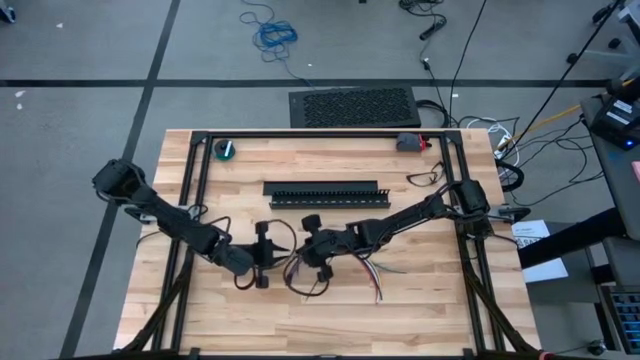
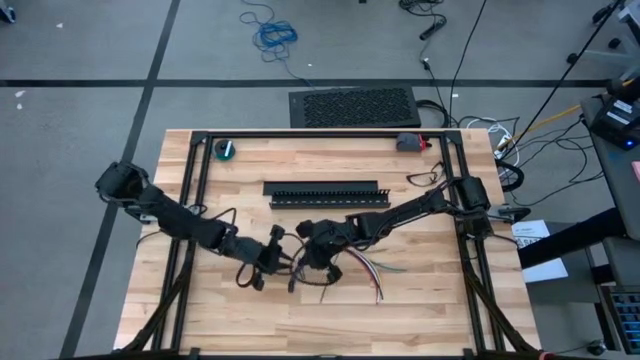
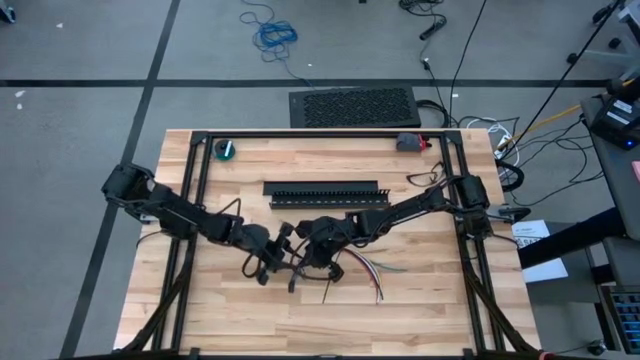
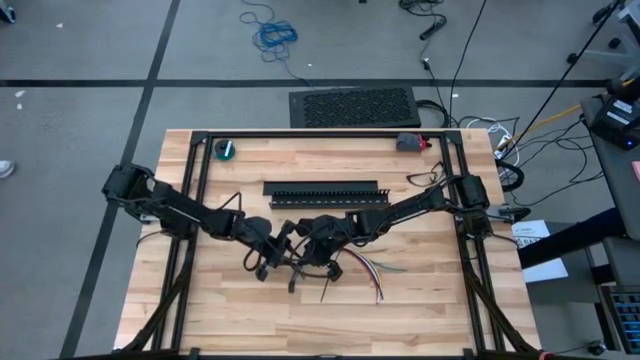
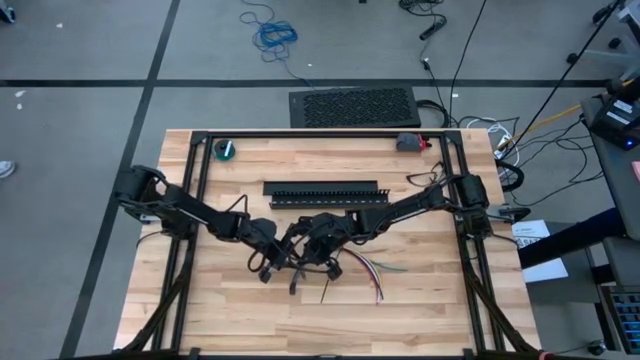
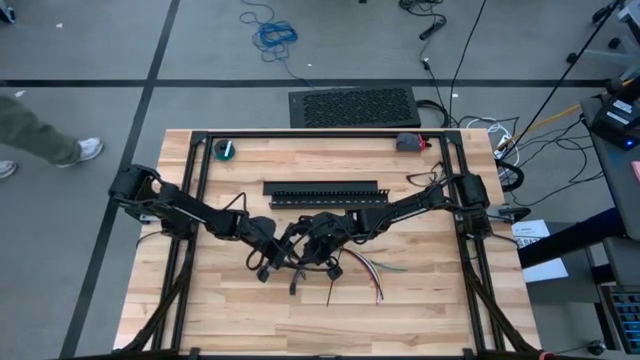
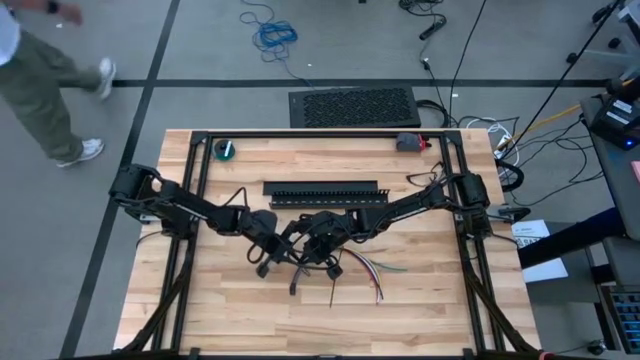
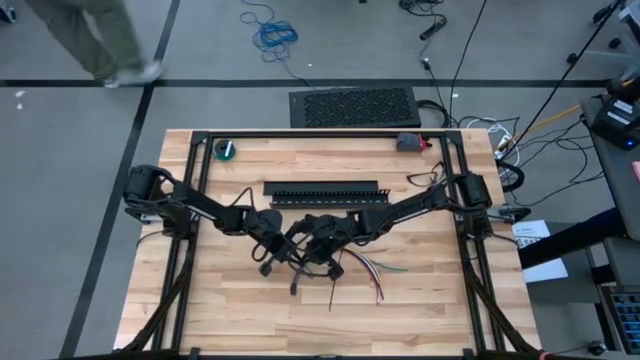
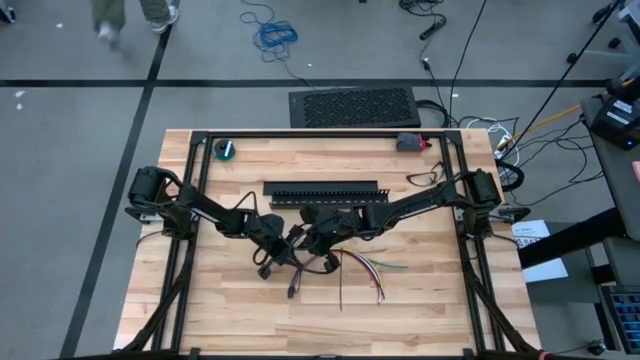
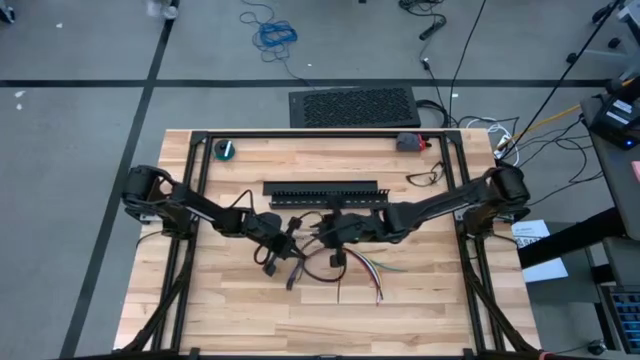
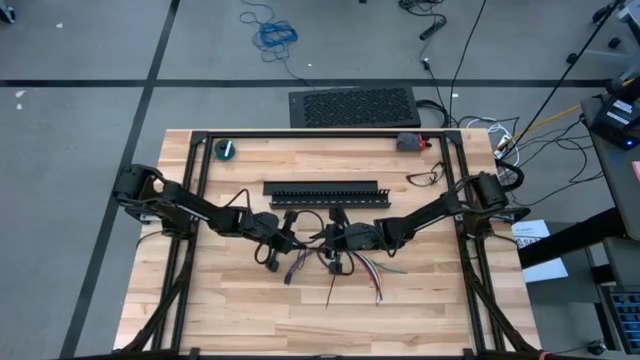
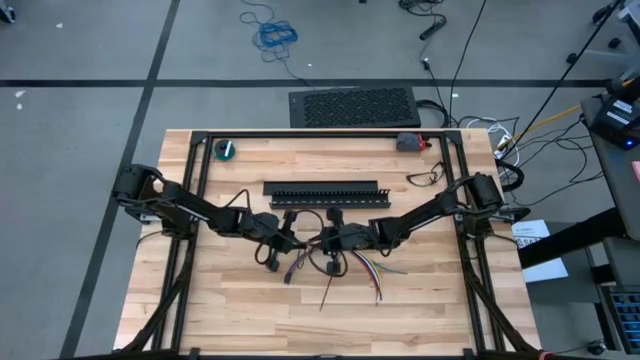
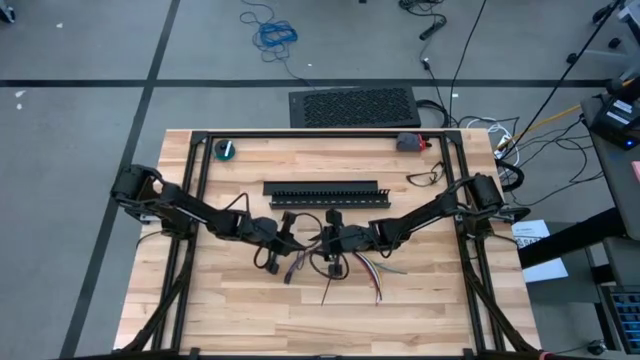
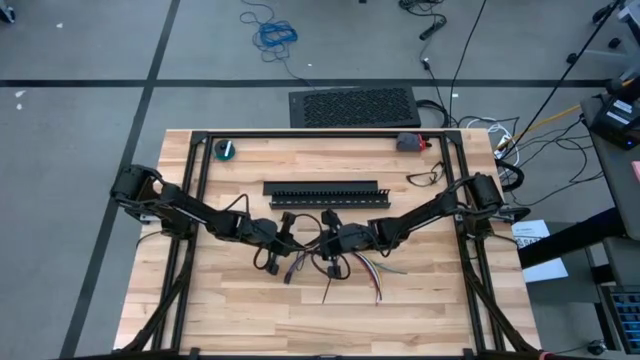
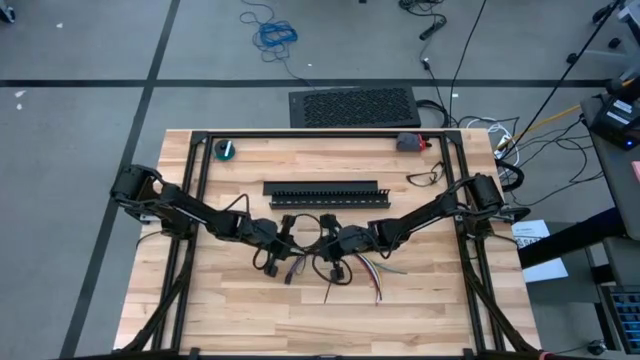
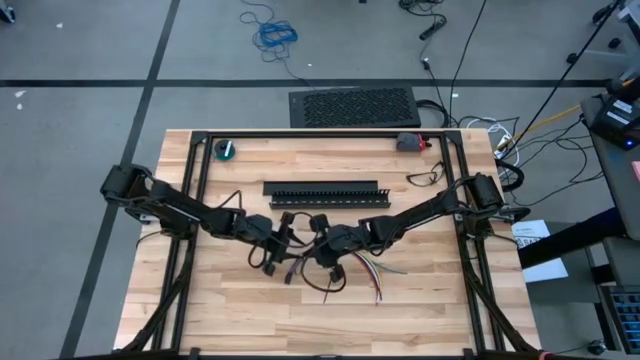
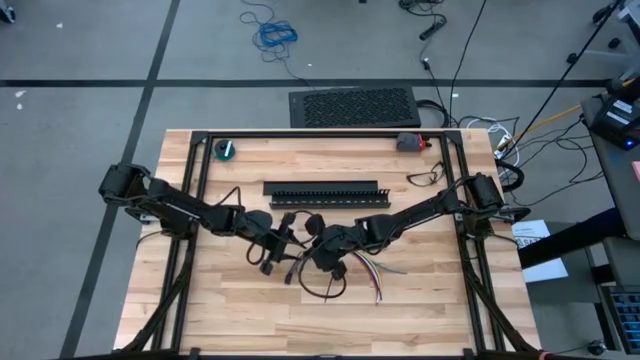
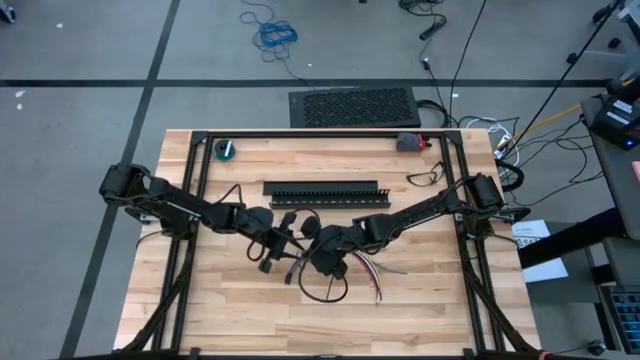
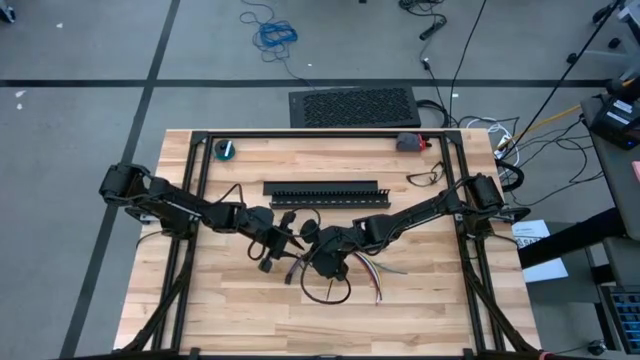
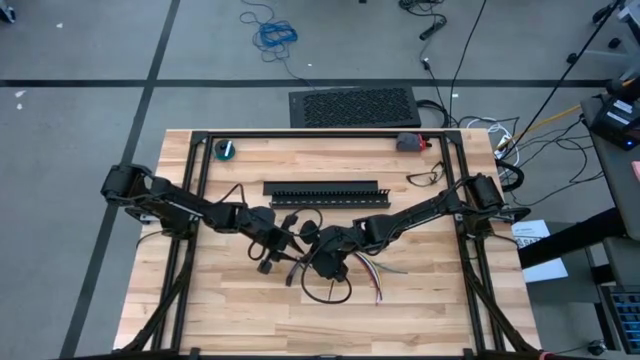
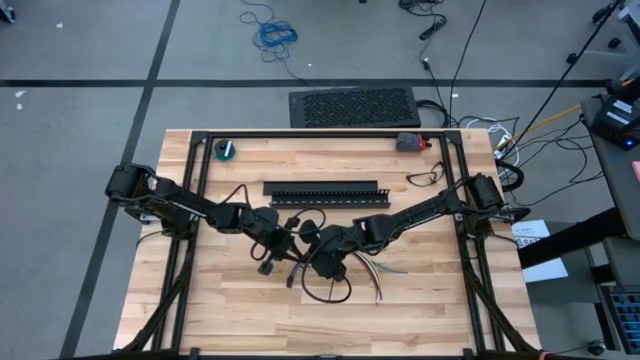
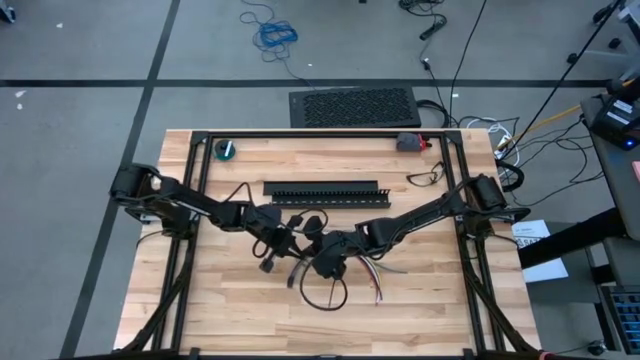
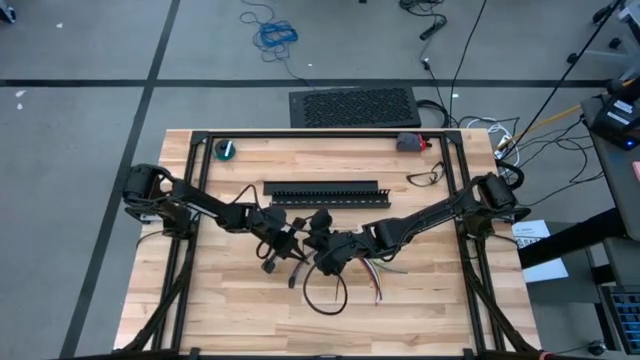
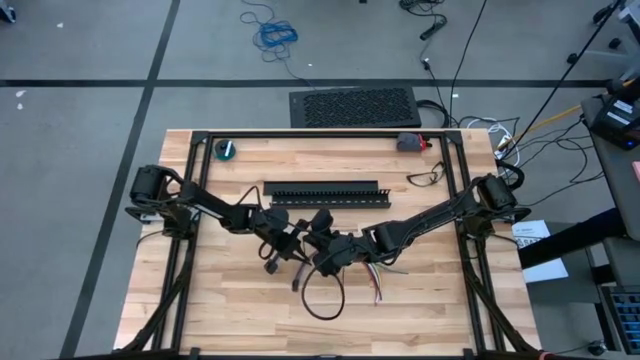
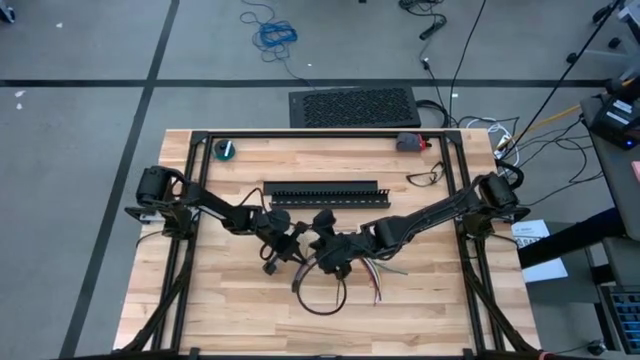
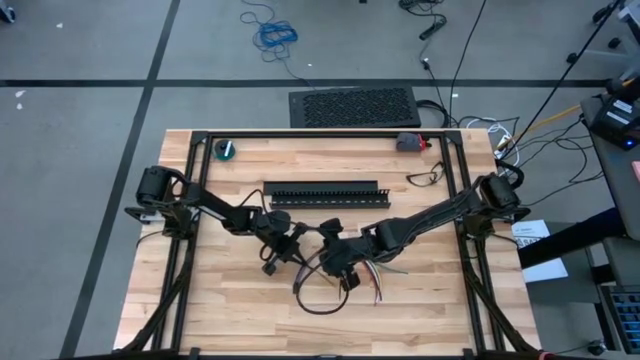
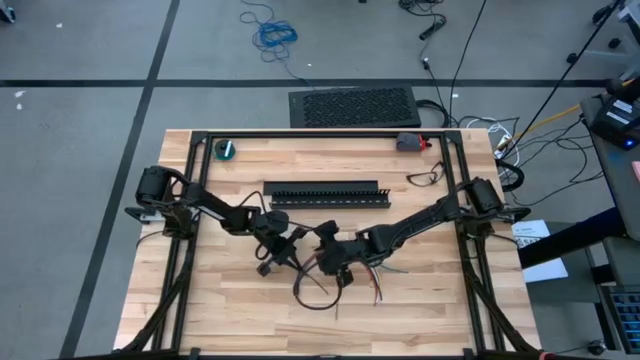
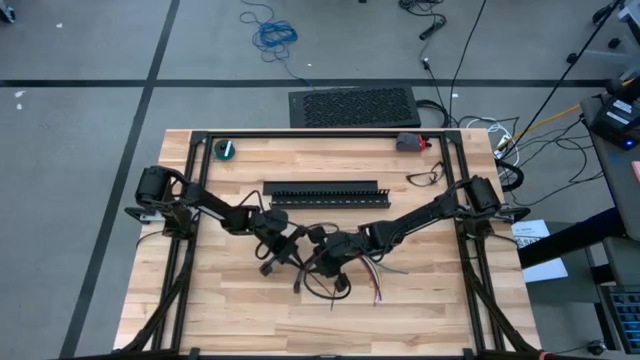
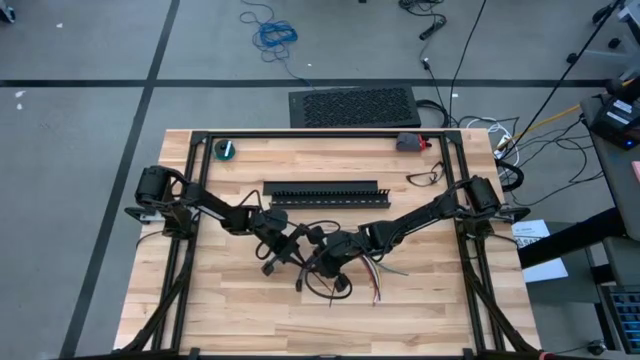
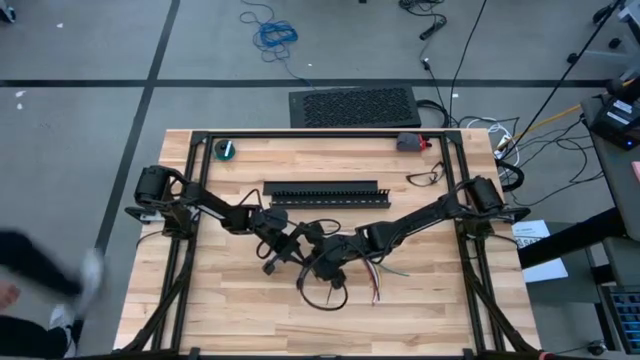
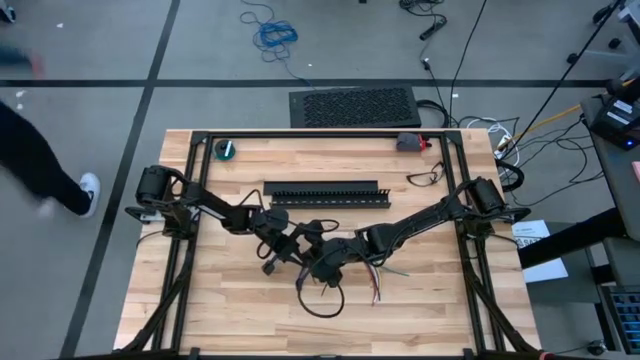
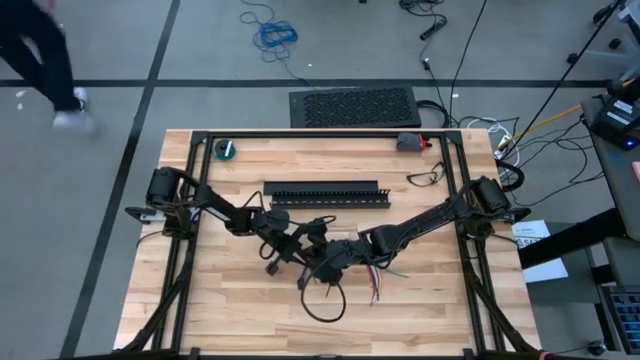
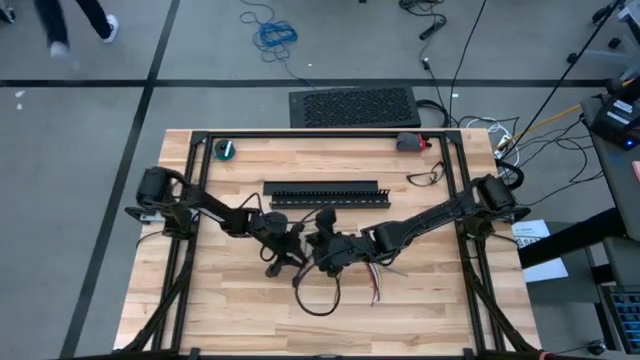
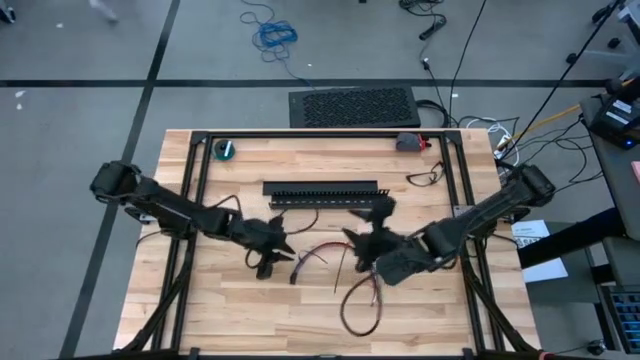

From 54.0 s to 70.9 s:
Task: Ziptie cables
Wrap the cables together using a zip tie
